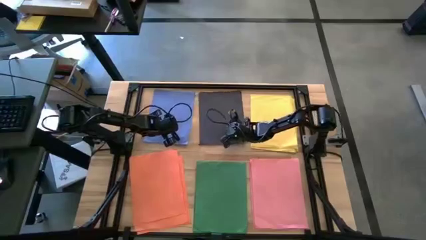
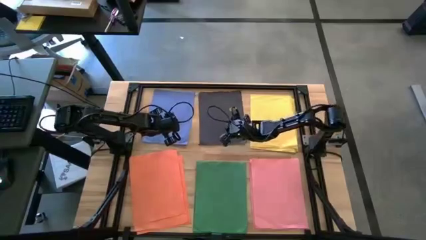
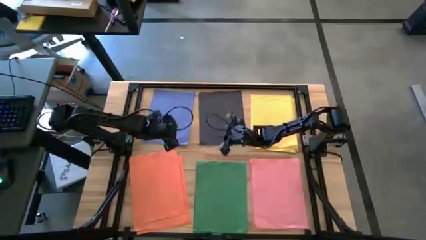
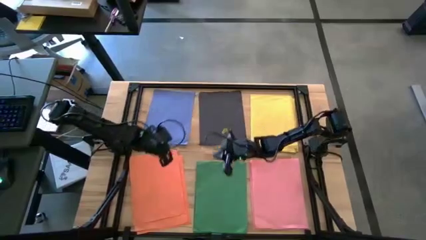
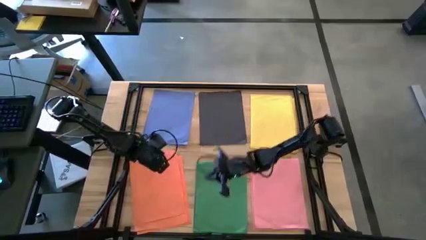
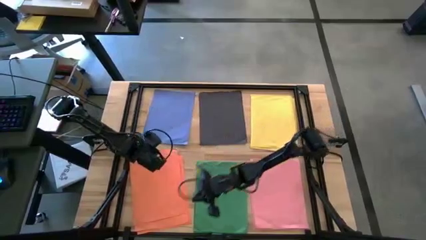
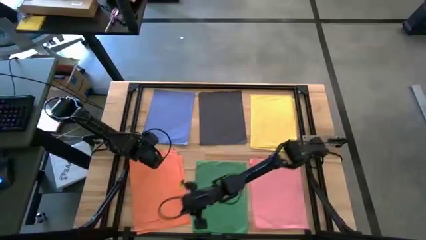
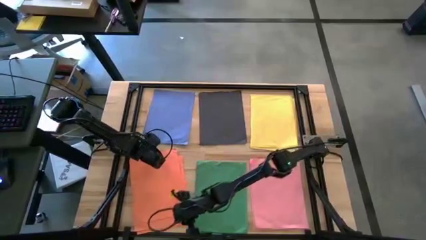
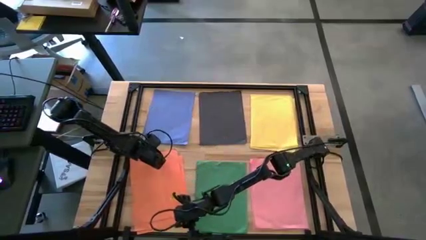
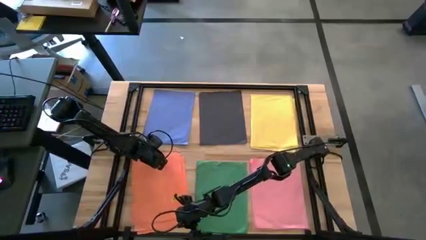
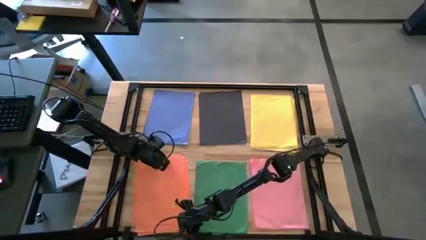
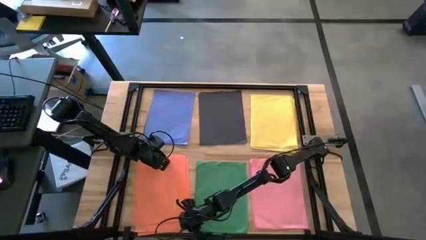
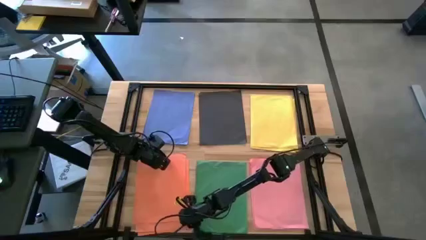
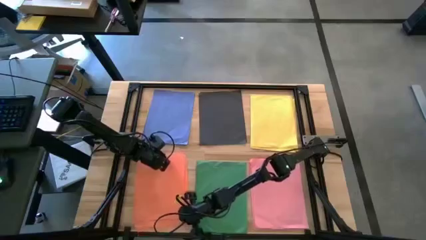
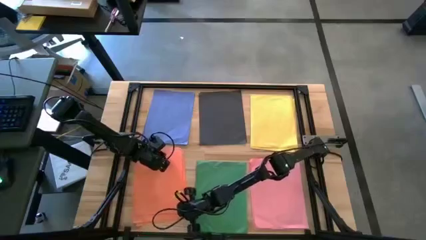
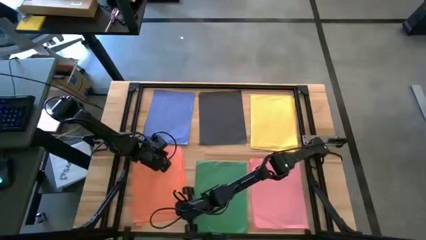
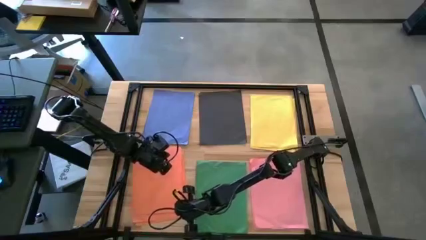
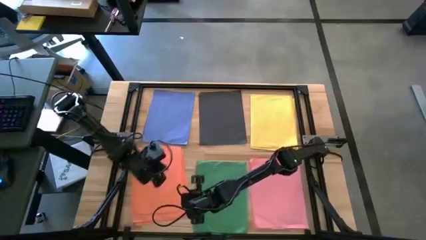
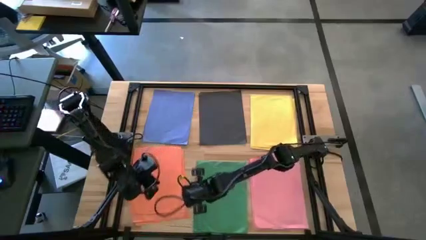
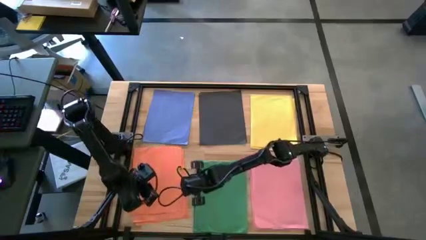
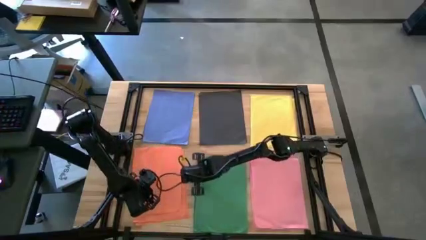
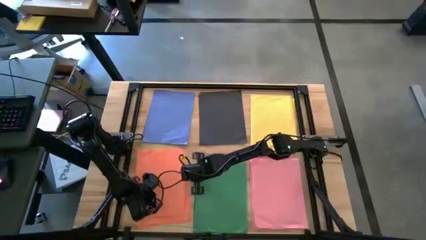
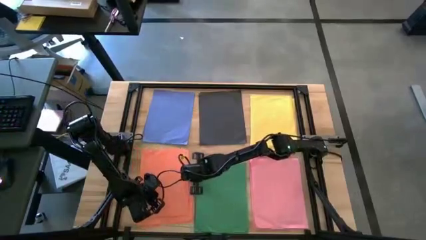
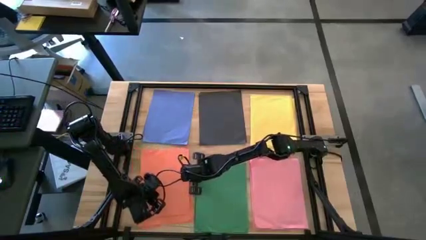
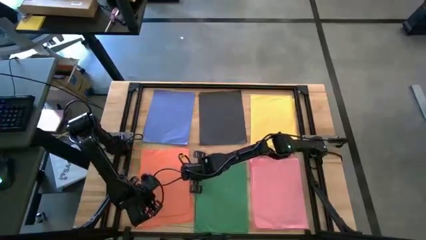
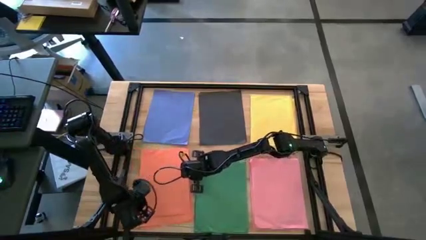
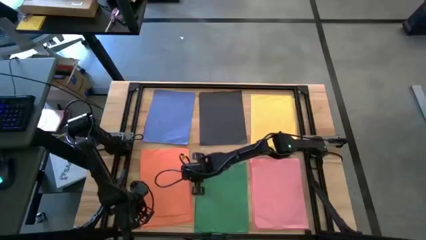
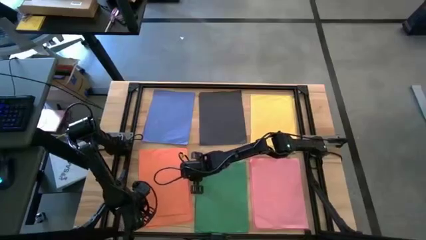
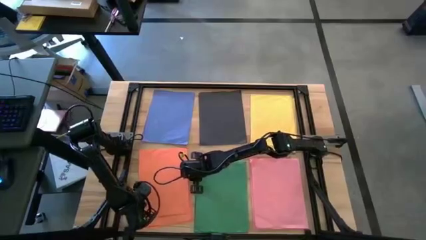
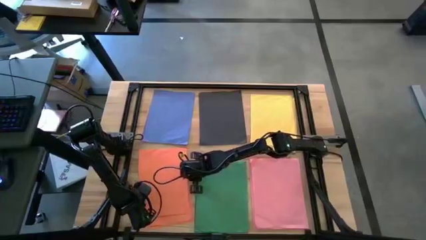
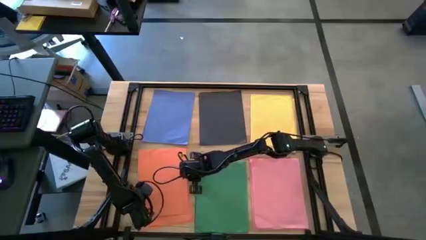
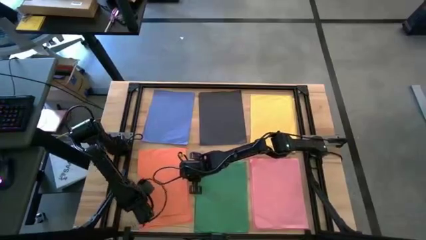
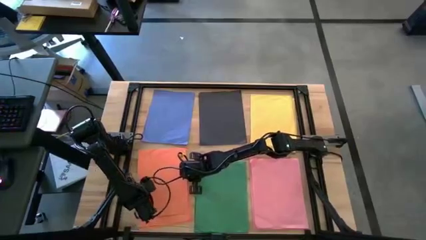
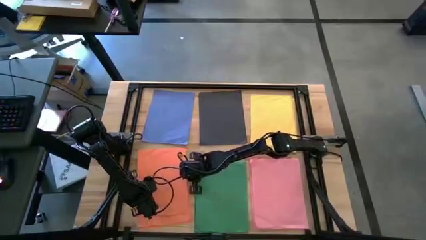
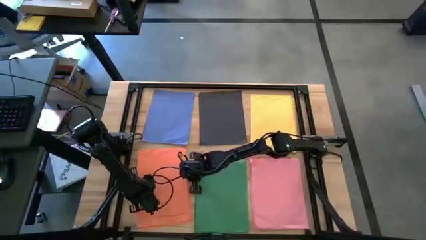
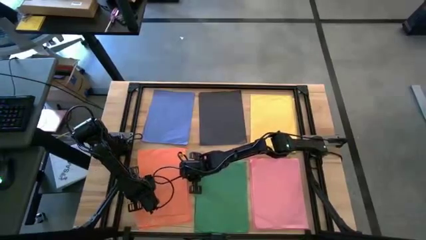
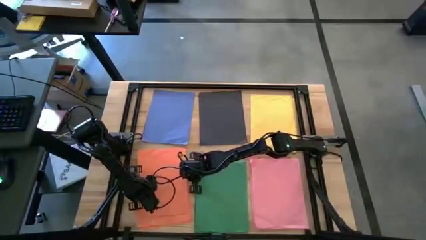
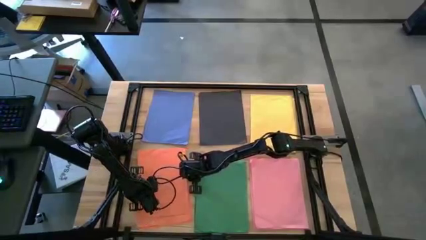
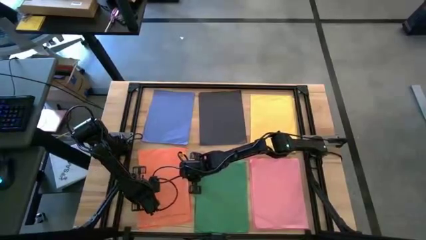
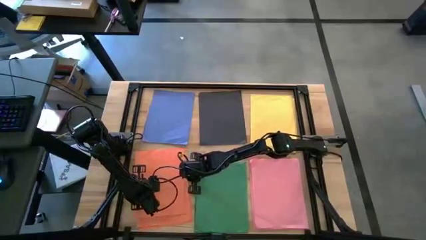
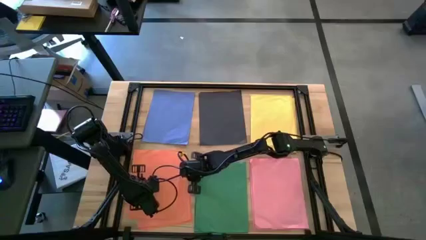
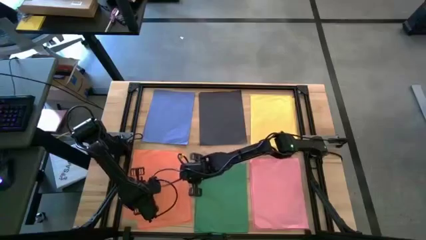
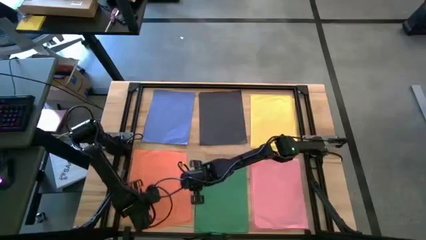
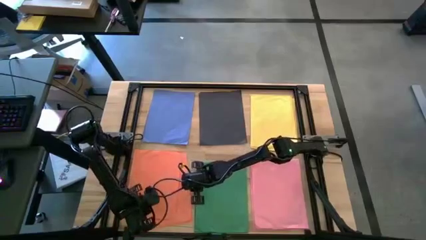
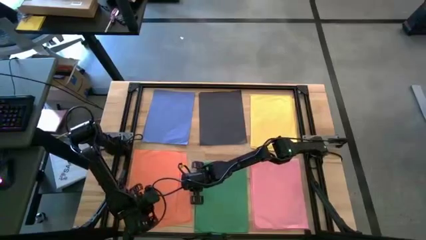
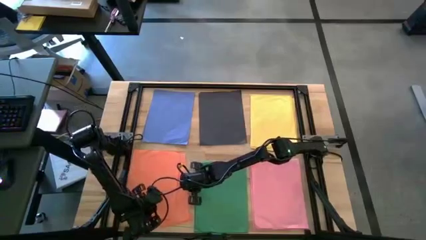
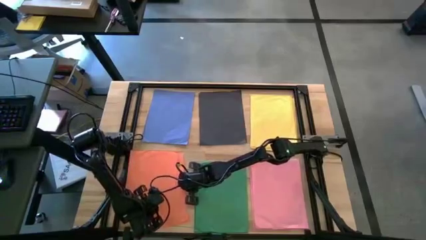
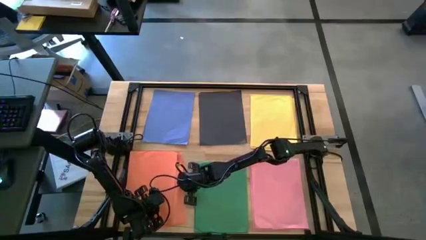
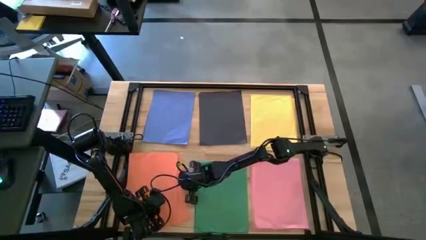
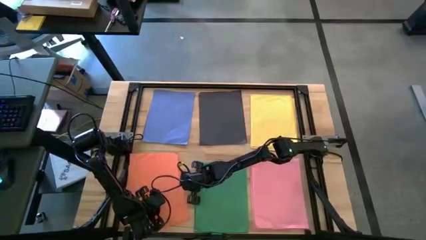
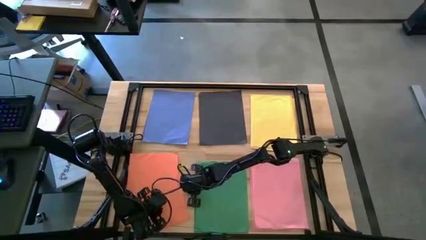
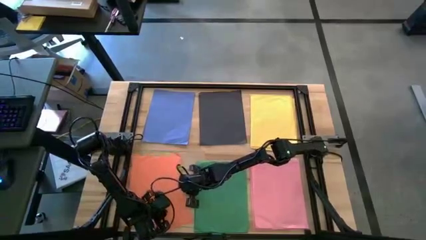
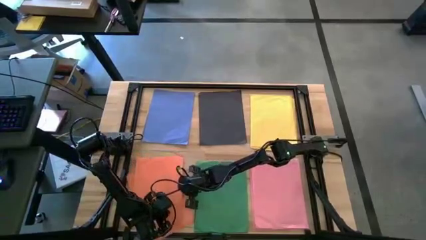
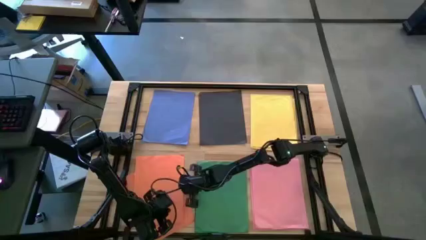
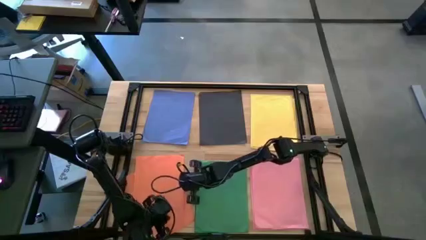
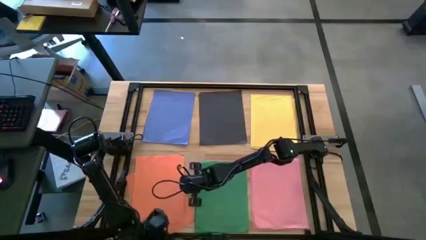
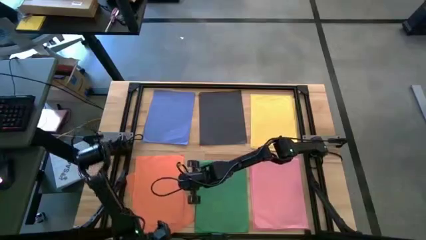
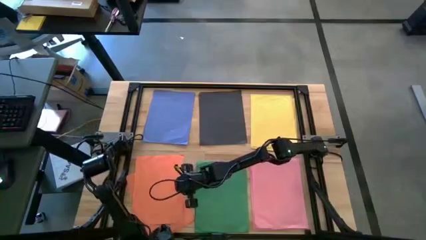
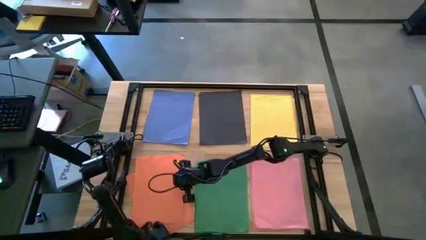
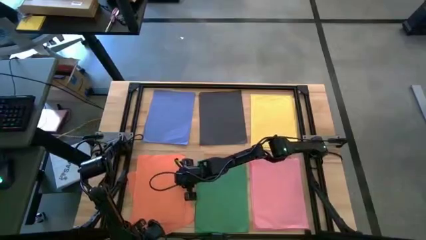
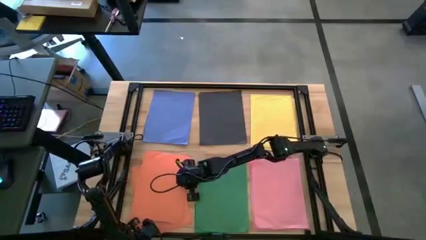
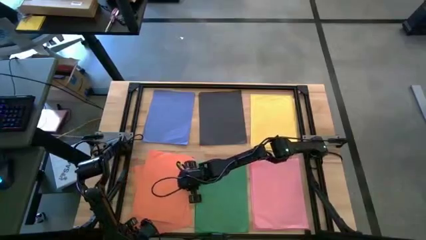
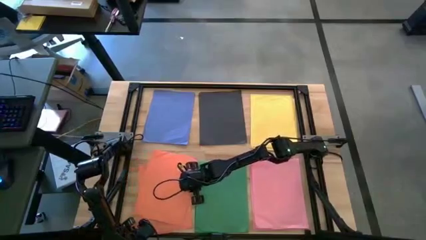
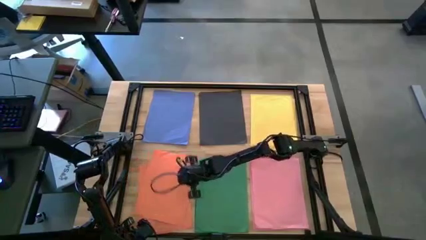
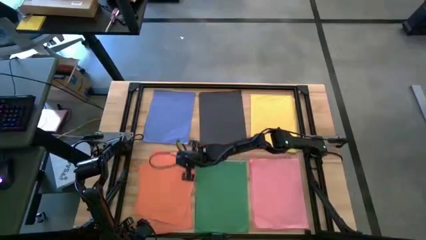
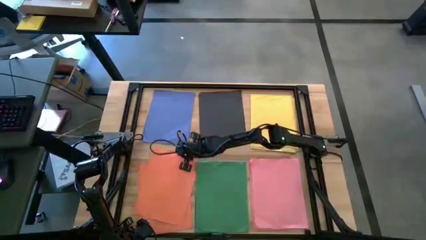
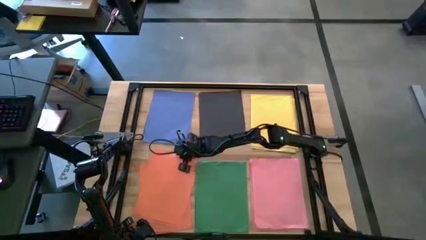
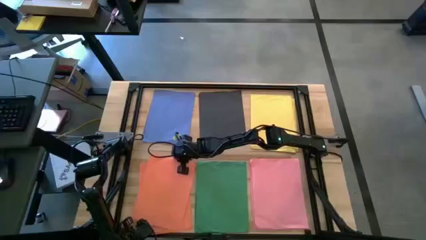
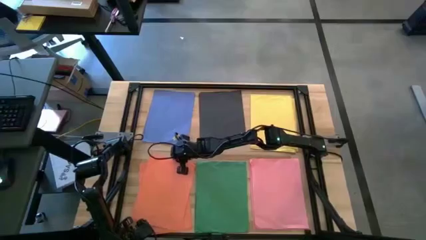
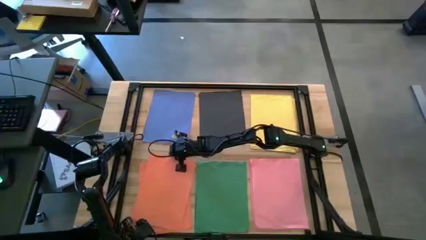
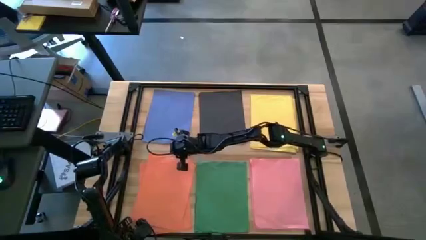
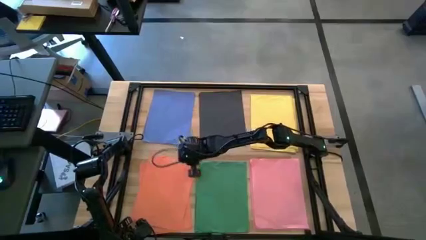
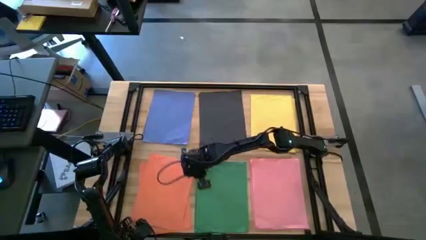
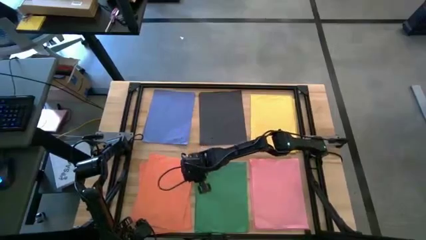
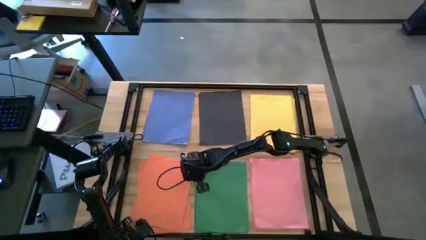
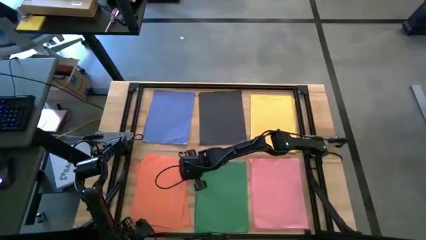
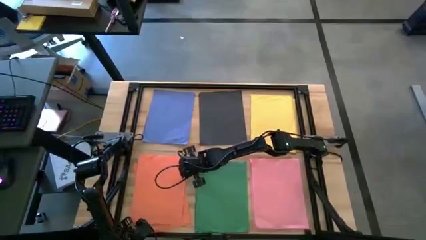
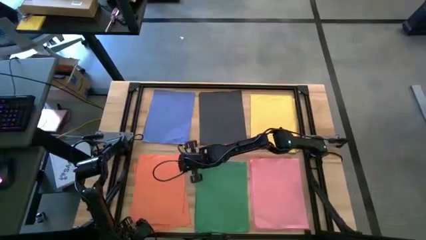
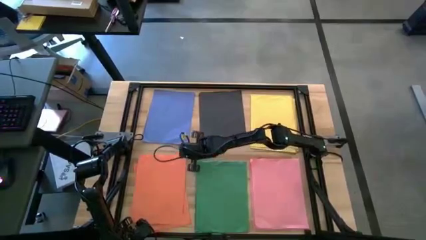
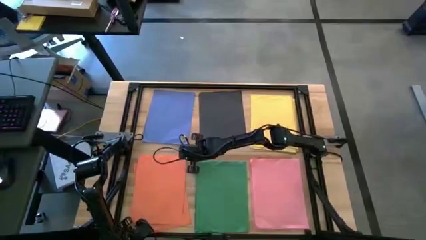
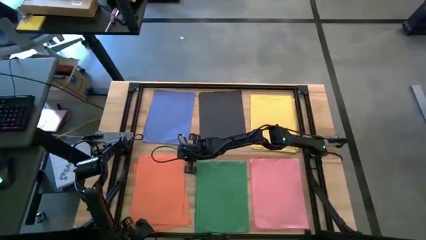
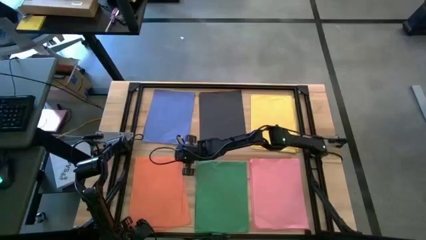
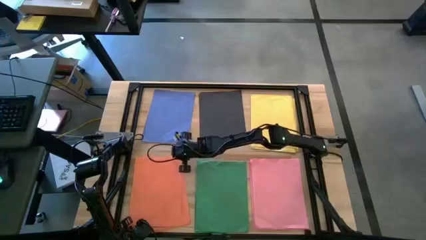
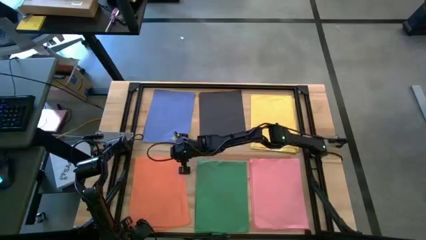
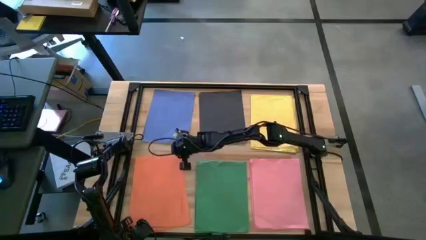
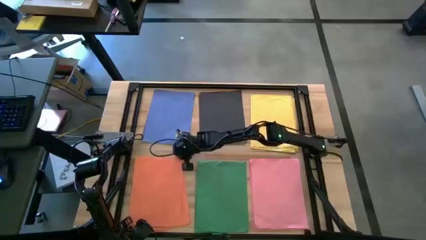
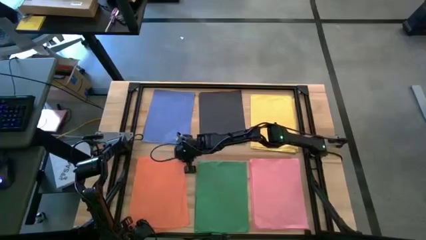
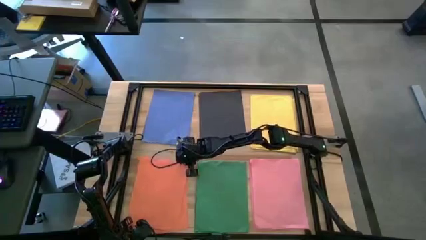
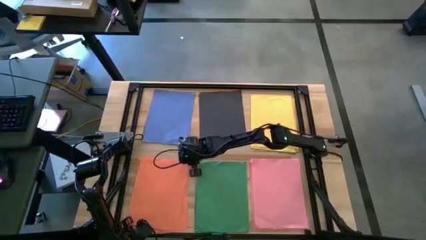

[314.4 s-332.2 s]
Task: Organize paper
Adjust the orange, green, and pink papers
